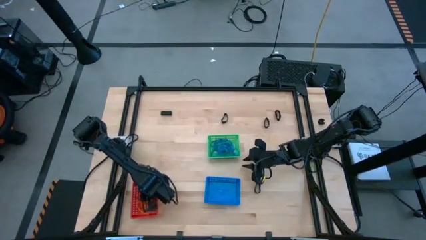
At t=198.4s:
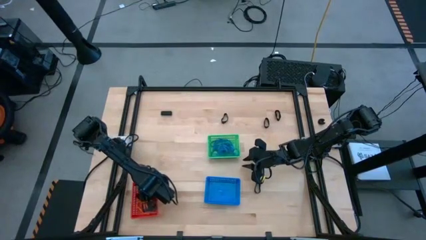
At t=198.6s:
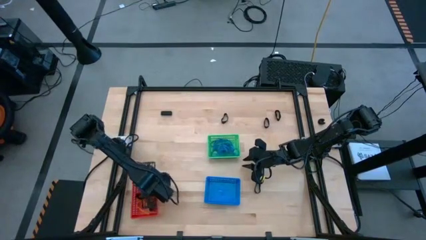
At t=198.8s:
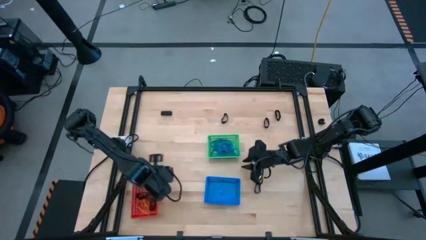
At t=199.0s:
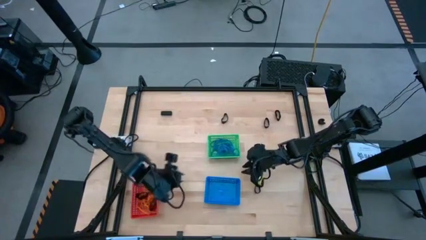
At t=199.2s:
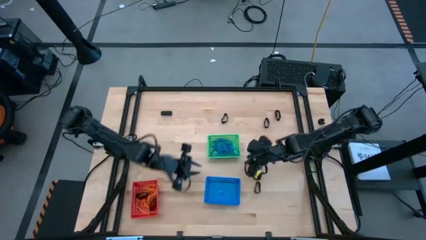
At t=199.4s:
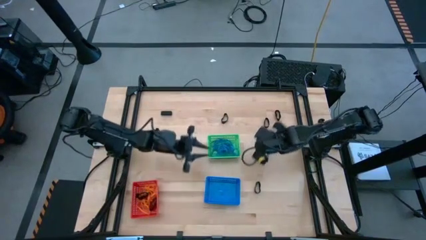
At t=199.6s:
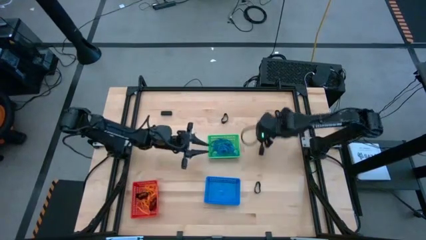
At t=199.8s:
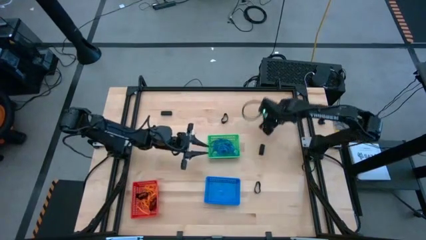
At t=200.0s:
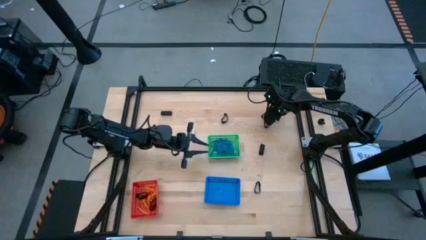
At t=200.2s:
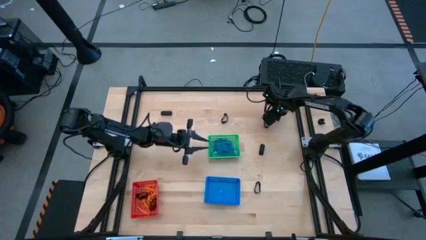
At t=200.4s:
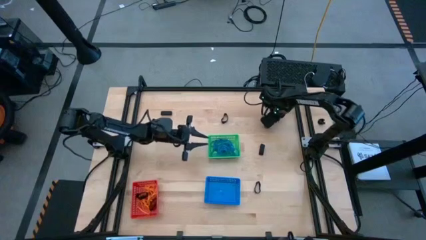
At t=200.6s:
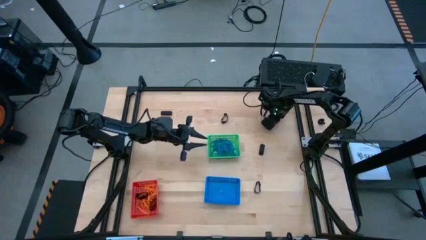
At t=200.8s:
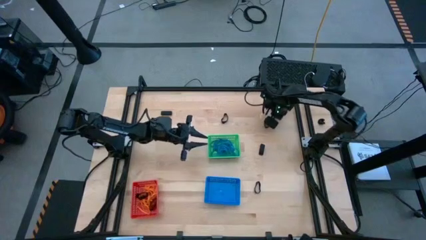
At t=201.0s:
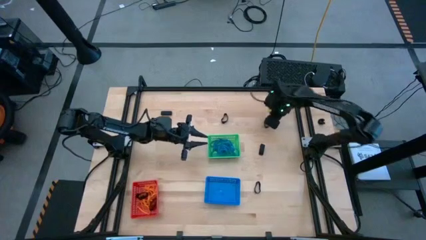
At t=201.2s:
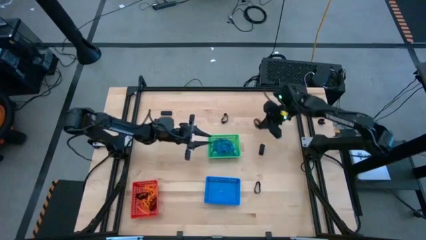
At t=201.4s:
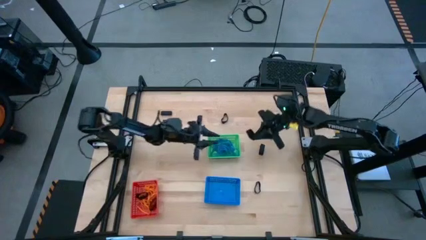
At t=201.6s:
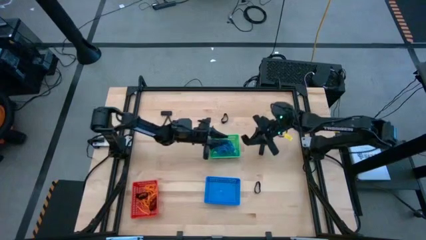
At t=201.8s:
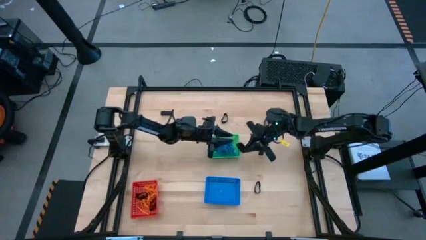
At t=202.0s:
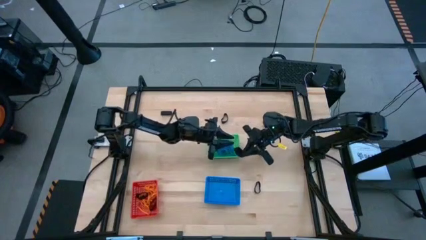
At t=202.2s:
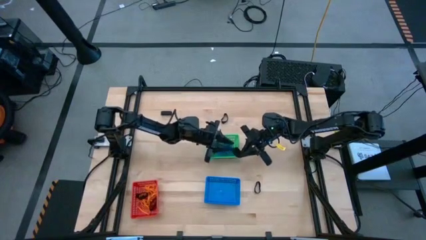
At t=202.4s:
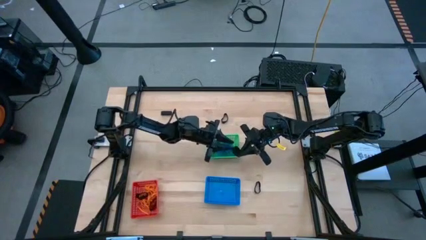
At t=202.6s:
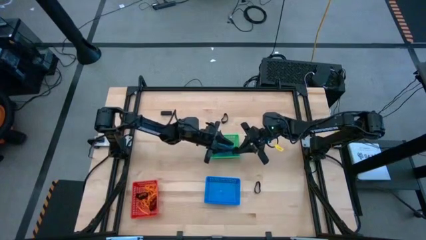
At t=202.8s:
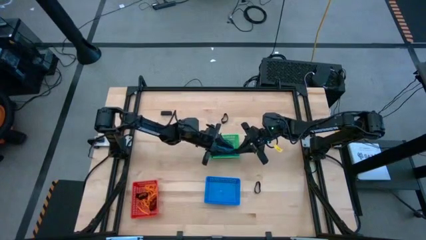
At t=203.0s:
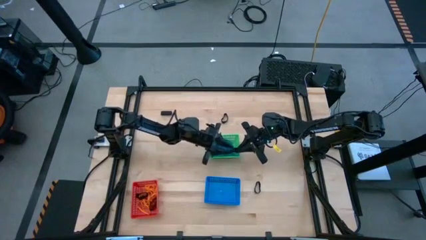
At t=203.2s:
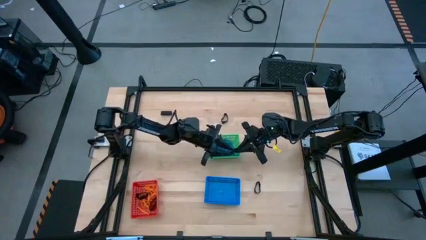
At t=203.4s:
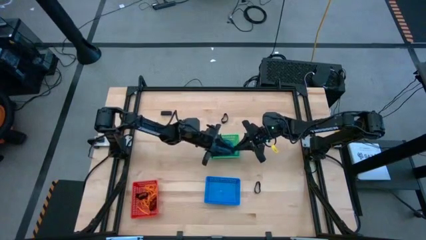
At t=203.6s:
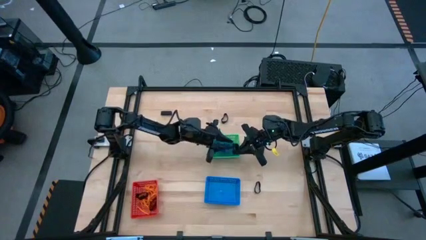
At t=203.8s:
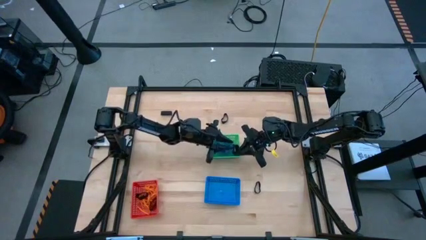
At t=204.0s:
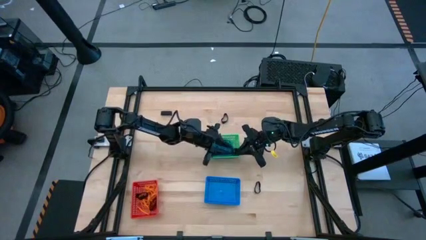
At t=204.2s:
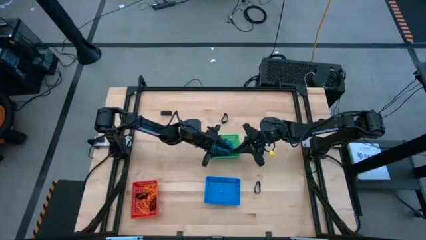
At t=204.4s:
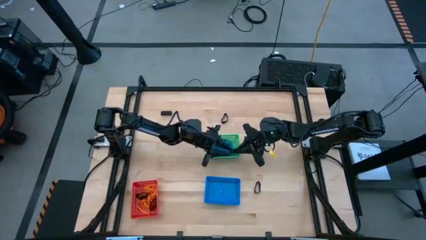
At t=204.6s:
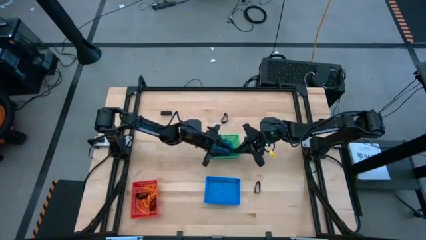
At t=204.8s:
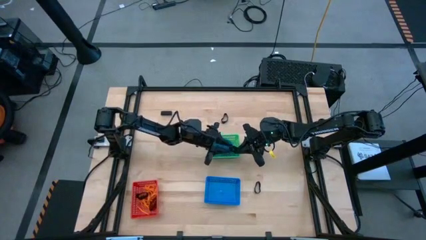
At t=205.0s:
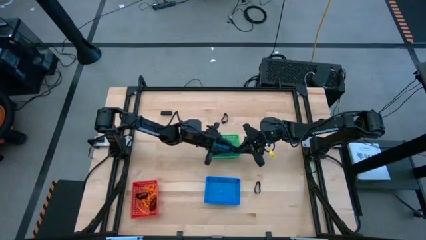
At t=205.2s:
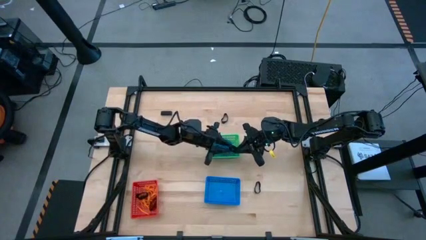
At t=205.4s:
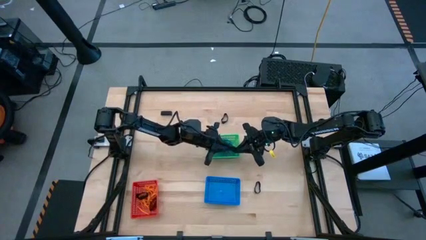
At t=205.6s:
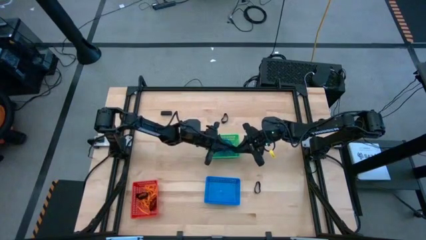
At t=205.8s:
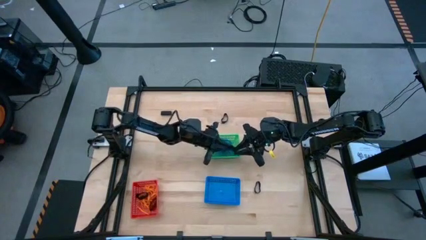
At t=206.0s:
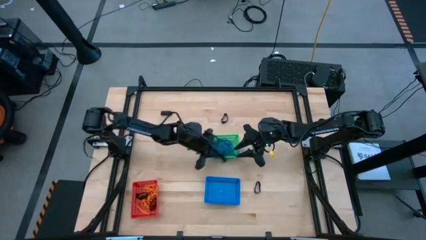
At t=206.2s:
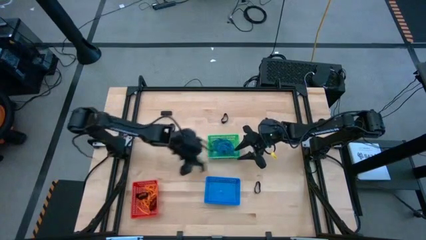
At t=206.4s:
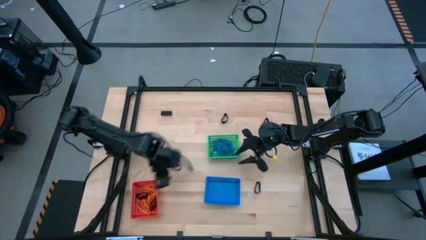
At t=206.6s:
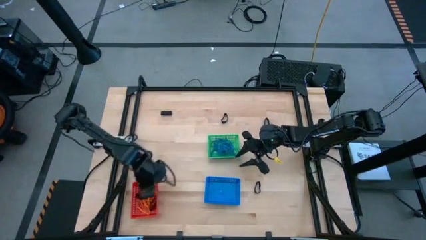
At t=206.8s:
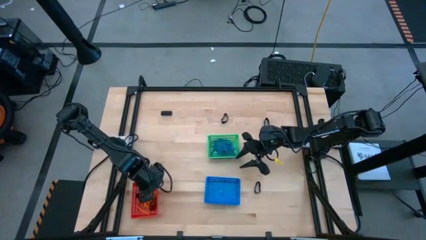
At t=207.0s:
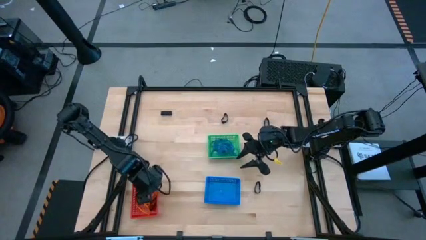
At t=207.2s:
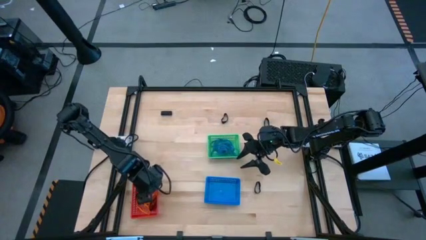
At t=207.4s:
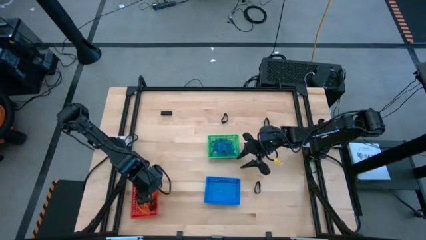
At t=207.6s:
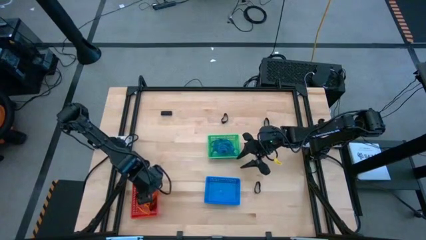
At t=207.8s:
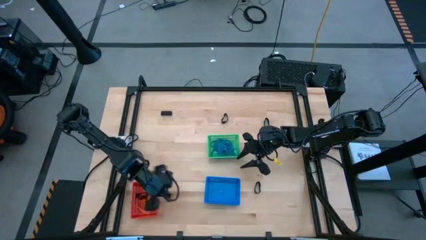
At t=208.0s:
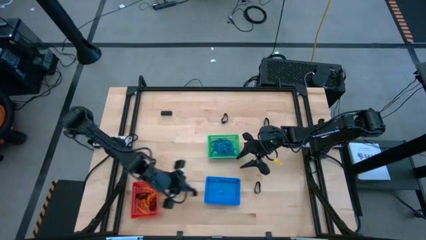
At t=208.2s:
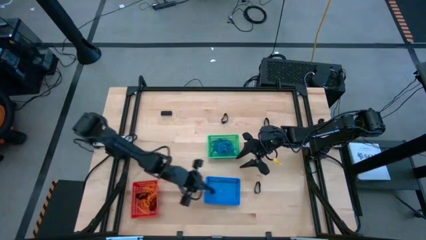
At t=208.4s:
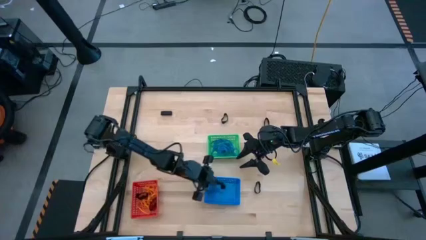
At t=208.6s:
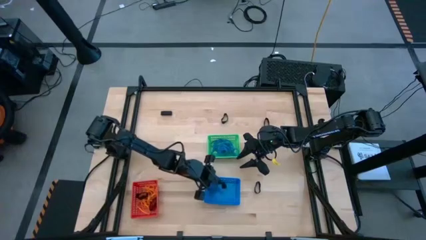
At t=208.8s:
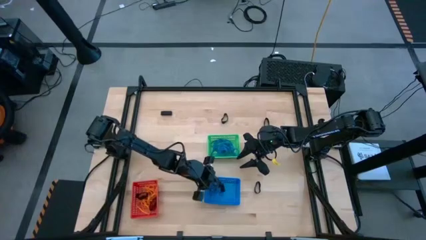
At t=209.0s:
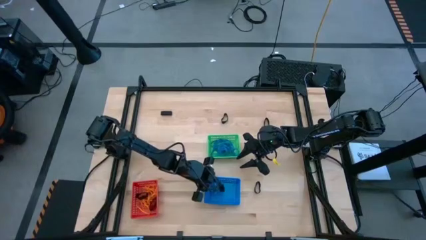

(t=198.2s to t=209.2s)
Task: Sort rubber bands into baskets
Put the black rubberband into the blue bin

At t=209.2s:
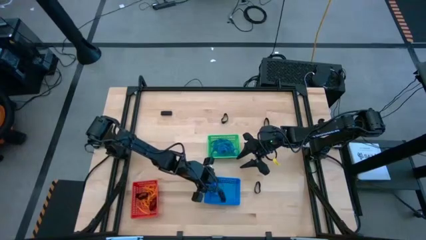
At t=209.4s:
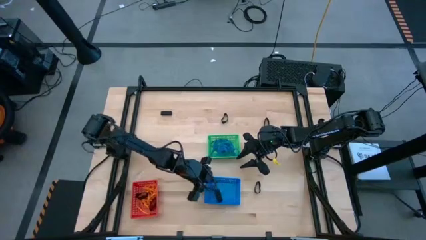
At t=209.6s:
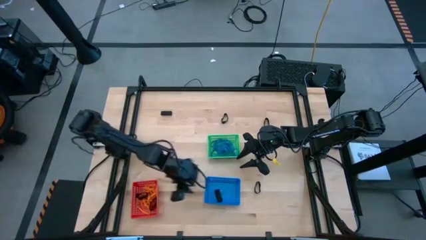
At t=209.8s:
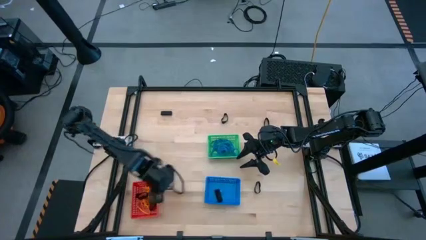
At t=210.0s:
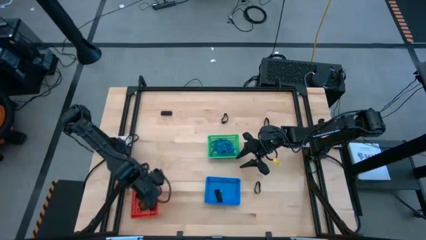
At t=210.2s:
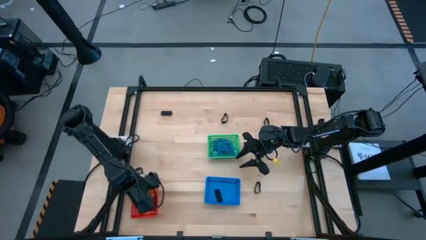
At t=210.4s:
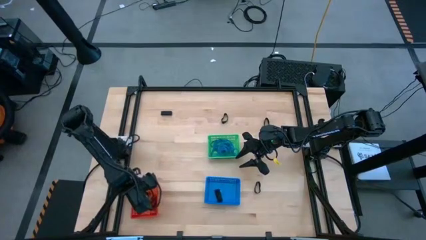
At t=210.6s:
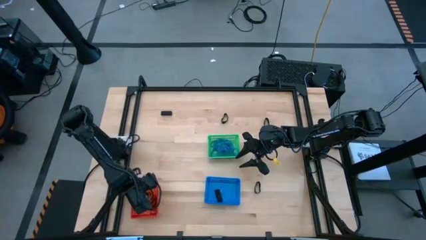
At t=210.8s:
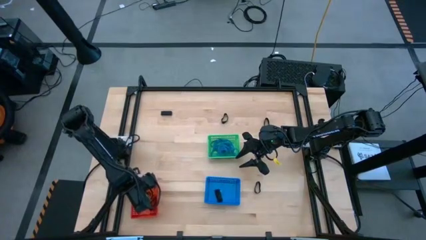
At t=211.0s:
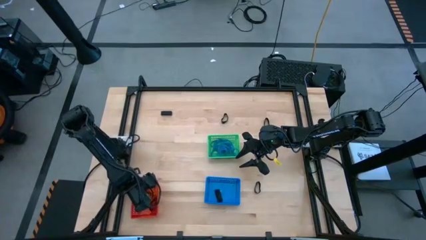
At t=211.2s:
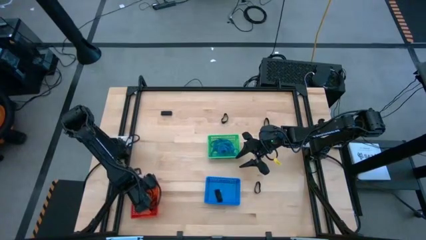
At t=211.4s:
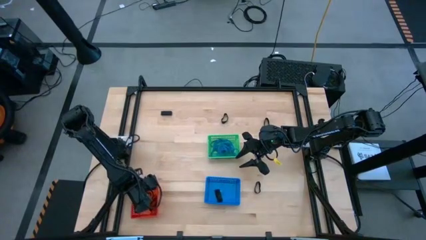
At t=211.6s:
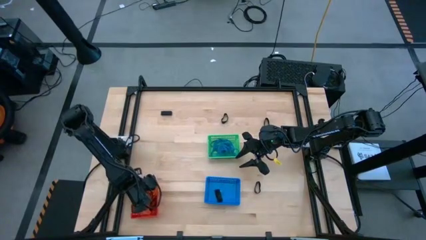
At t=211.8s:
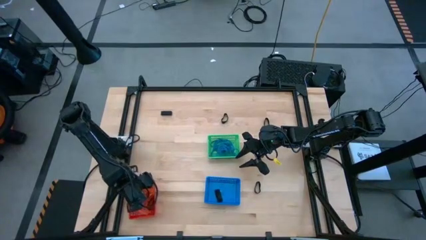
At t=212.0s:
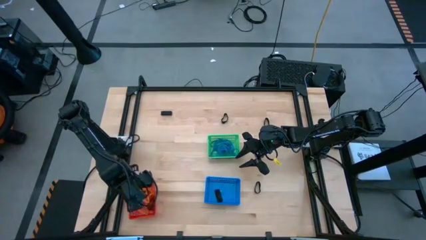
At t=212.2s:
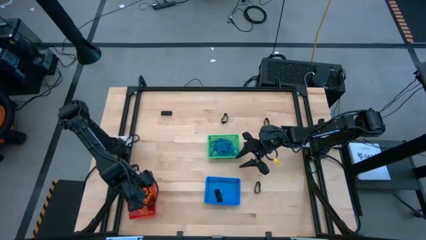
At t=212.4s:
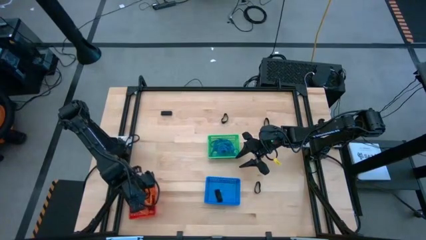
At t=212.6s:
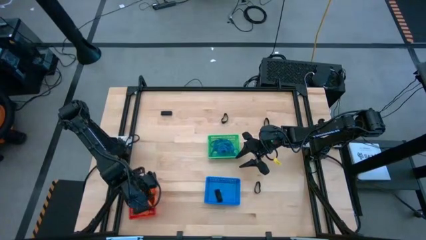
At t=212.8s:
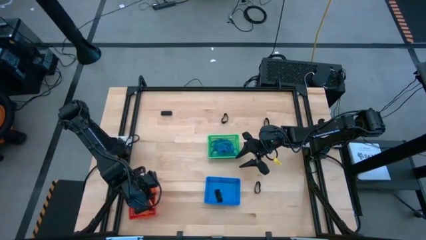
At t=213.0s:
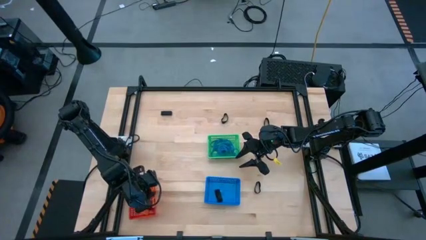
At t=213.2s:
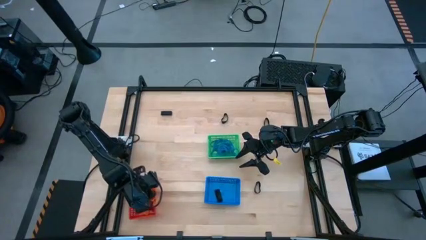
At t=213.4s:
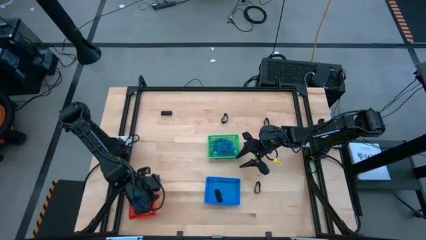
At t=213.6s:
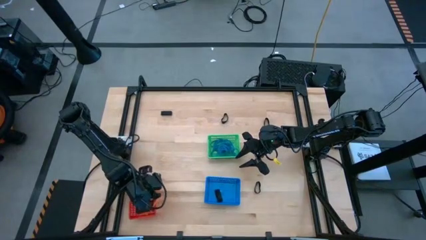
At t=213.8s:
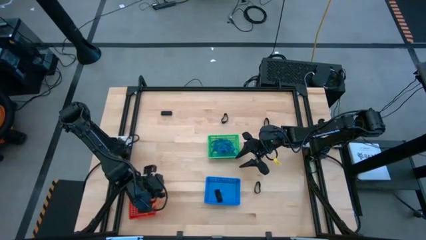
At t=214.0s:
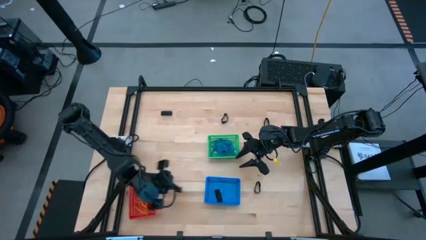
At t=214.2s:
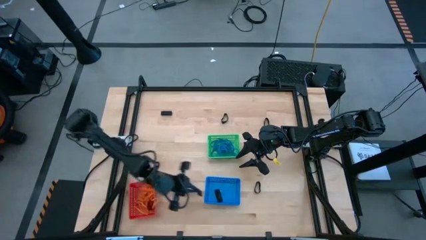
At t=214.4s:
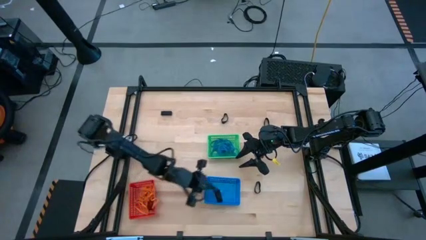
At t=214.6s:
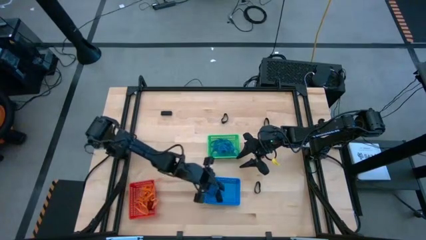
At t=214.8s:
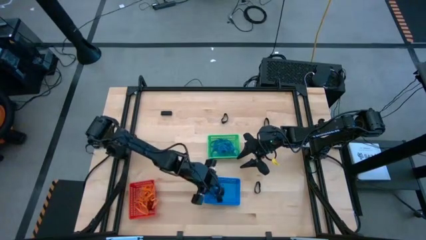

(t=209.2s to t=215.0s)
Put the black rubberband into the blue bin
